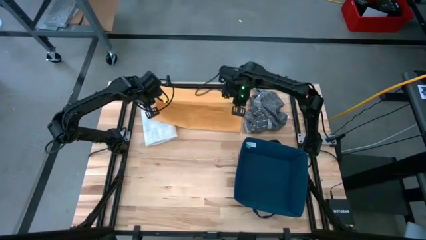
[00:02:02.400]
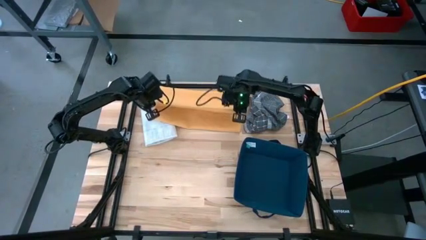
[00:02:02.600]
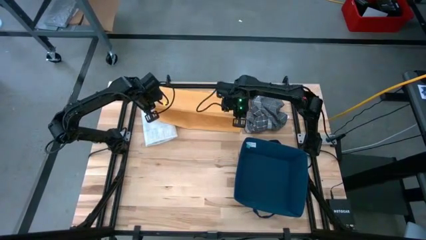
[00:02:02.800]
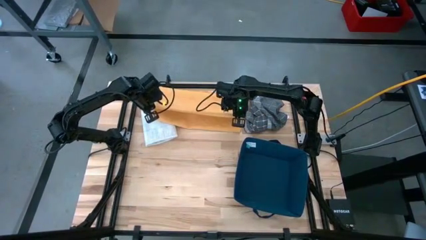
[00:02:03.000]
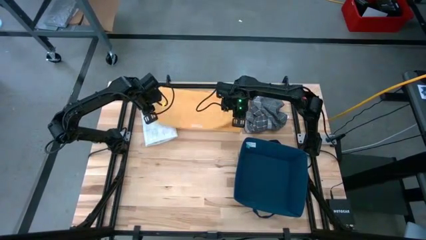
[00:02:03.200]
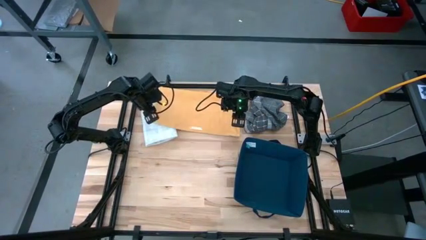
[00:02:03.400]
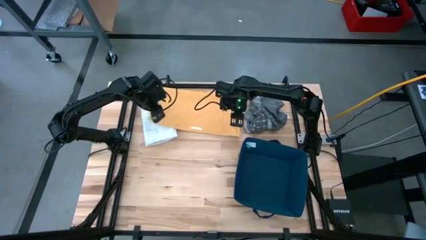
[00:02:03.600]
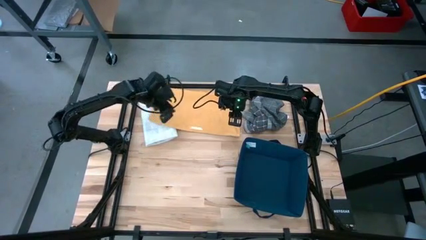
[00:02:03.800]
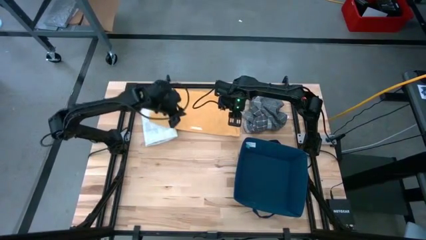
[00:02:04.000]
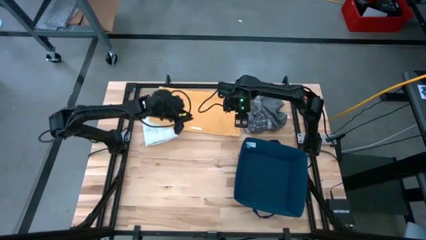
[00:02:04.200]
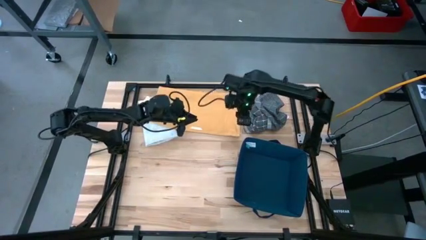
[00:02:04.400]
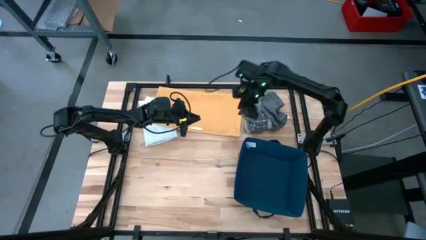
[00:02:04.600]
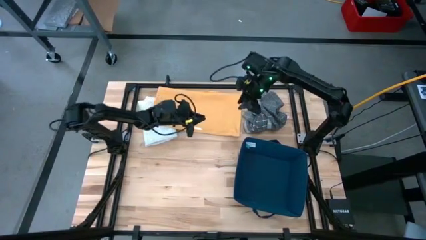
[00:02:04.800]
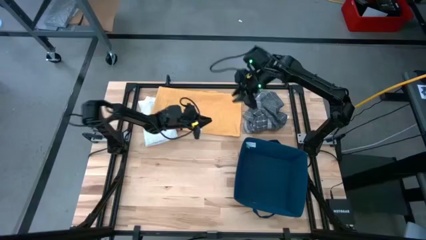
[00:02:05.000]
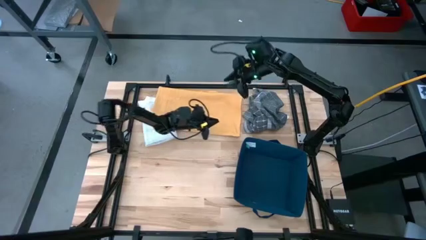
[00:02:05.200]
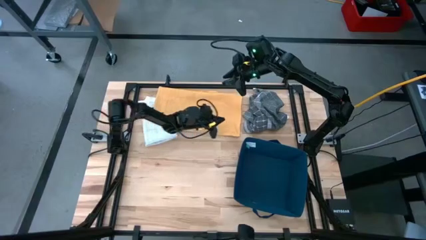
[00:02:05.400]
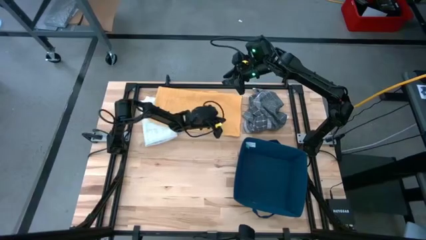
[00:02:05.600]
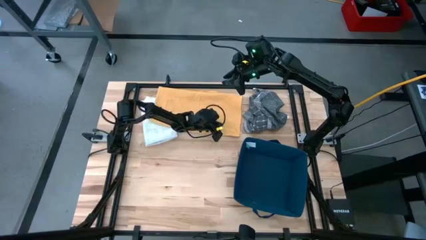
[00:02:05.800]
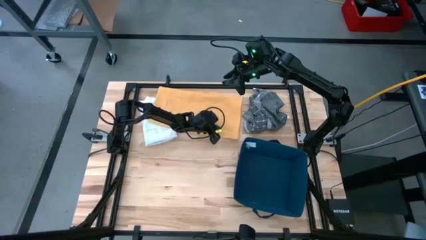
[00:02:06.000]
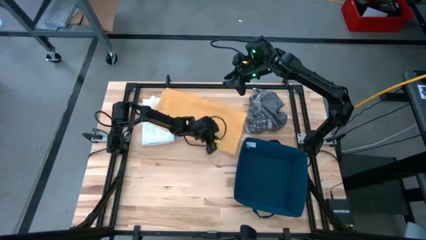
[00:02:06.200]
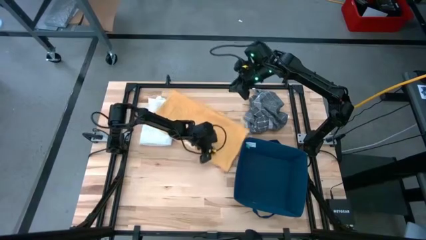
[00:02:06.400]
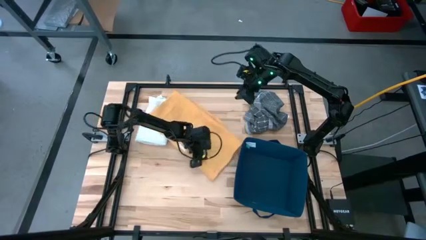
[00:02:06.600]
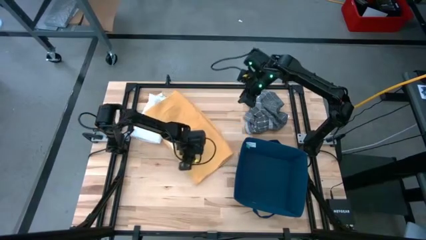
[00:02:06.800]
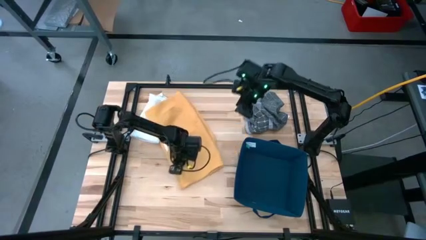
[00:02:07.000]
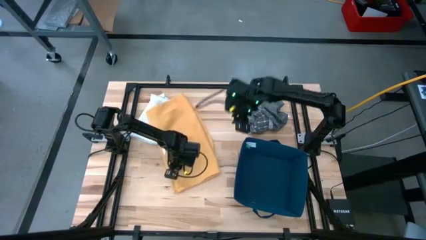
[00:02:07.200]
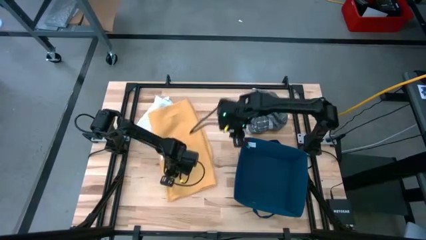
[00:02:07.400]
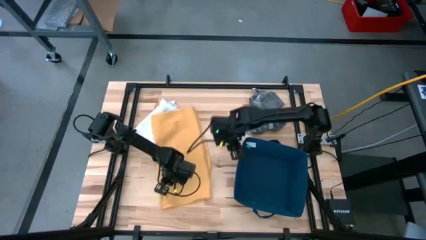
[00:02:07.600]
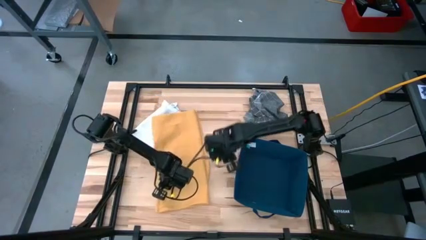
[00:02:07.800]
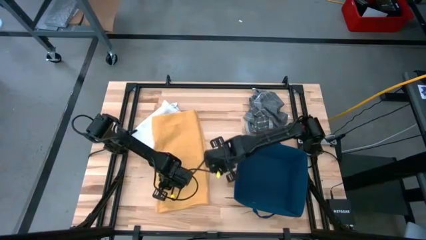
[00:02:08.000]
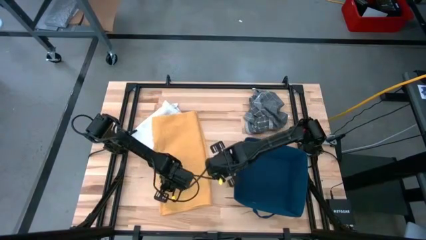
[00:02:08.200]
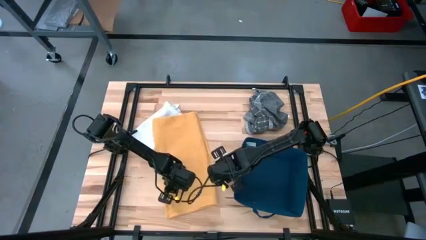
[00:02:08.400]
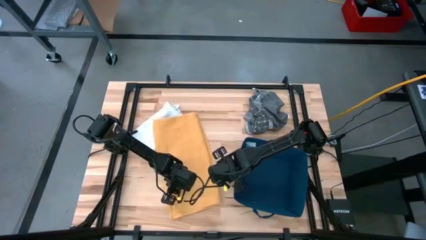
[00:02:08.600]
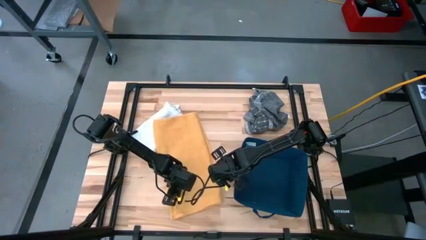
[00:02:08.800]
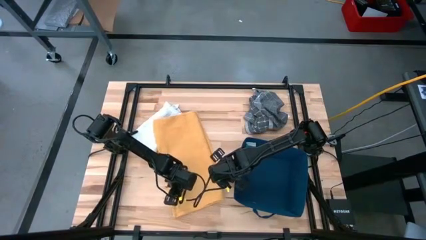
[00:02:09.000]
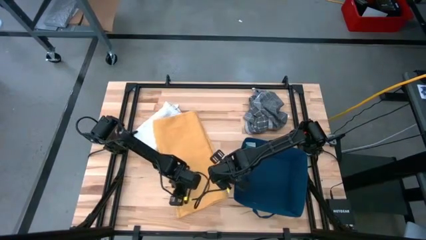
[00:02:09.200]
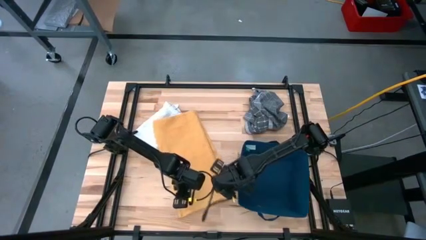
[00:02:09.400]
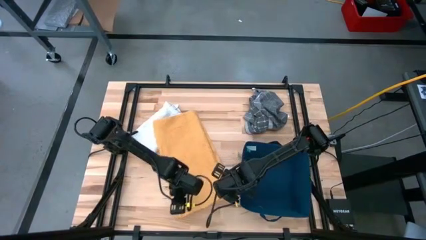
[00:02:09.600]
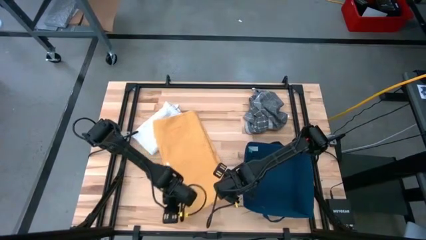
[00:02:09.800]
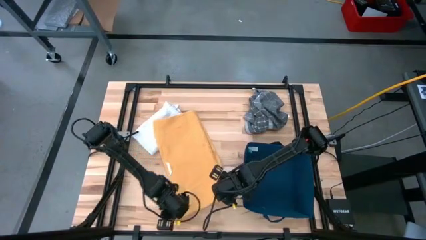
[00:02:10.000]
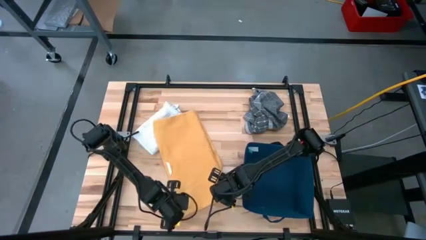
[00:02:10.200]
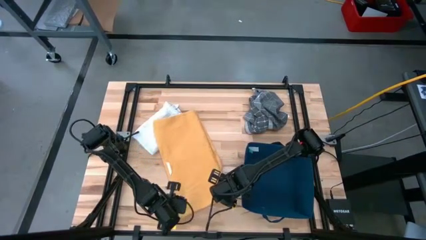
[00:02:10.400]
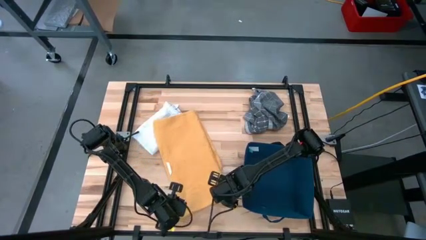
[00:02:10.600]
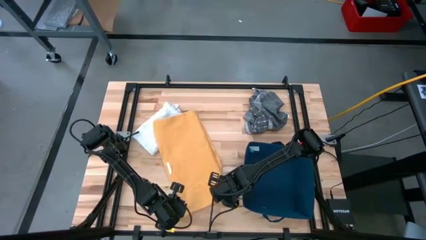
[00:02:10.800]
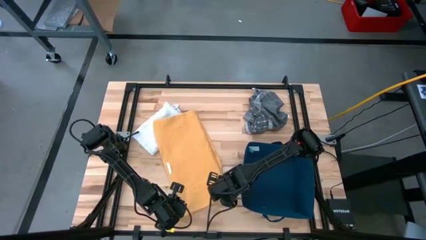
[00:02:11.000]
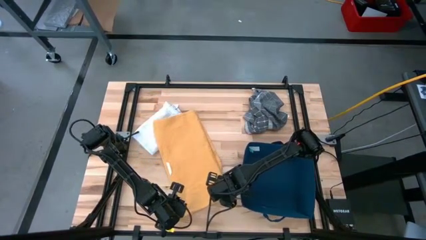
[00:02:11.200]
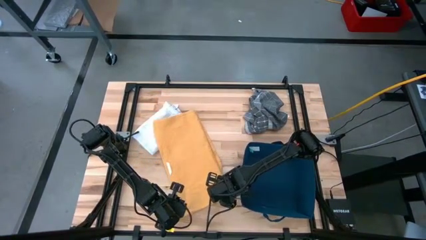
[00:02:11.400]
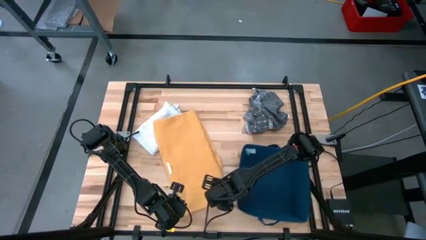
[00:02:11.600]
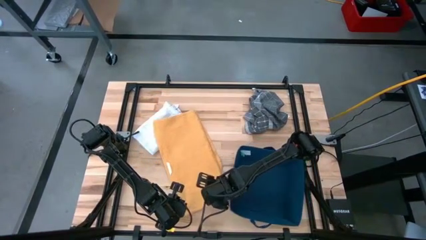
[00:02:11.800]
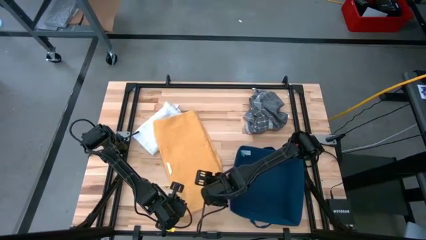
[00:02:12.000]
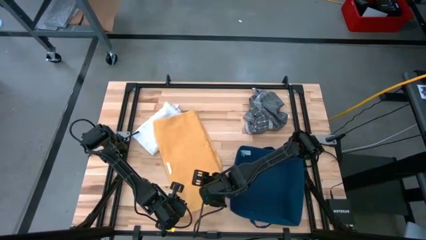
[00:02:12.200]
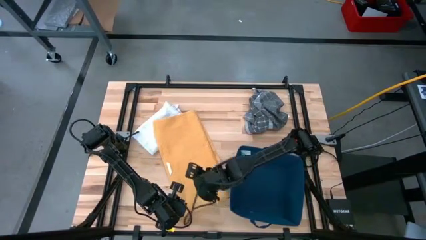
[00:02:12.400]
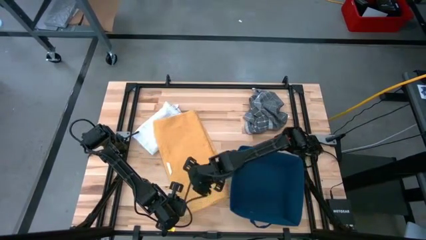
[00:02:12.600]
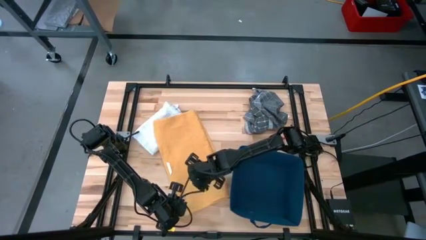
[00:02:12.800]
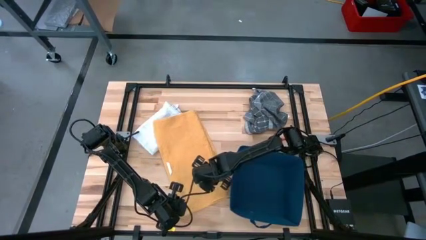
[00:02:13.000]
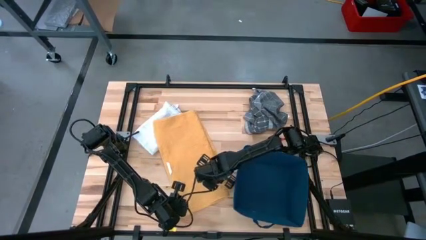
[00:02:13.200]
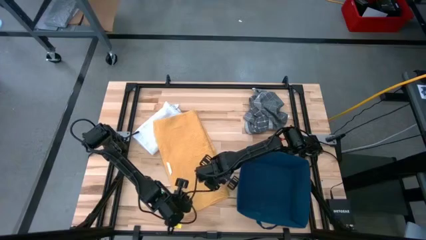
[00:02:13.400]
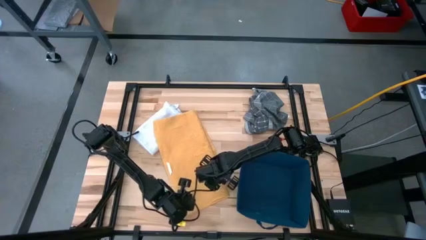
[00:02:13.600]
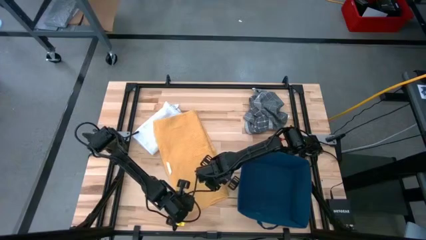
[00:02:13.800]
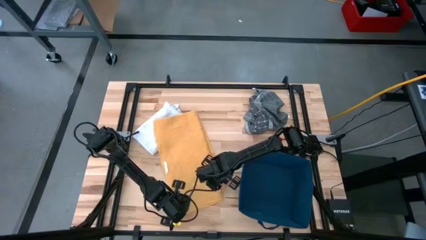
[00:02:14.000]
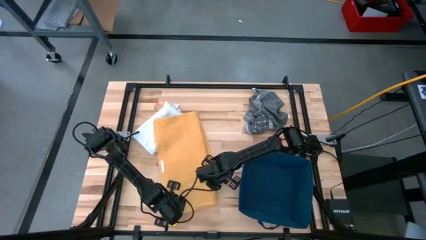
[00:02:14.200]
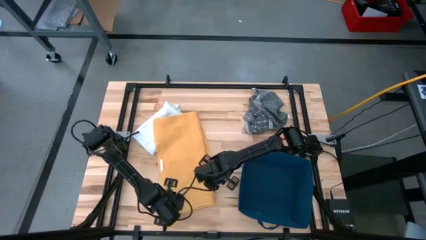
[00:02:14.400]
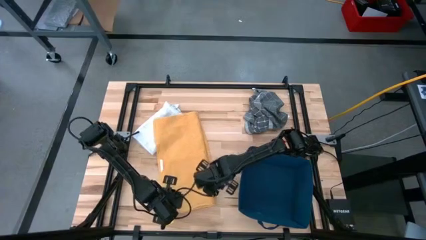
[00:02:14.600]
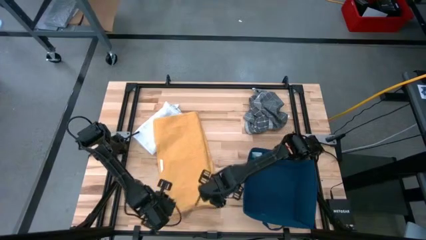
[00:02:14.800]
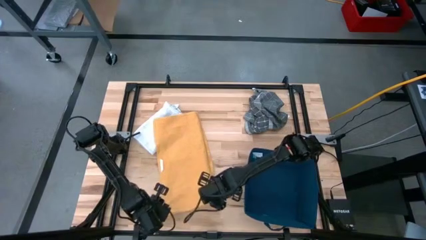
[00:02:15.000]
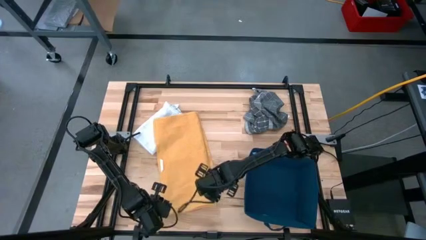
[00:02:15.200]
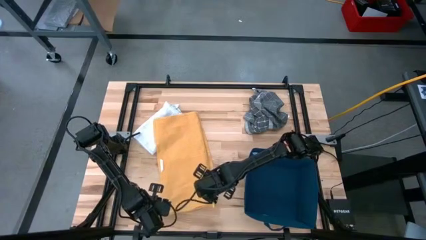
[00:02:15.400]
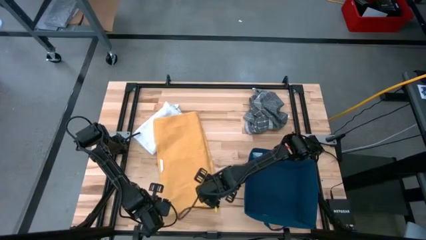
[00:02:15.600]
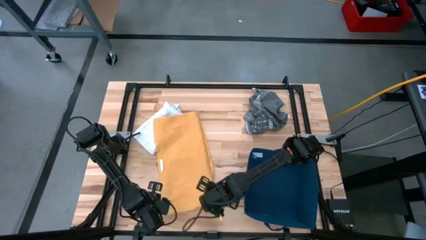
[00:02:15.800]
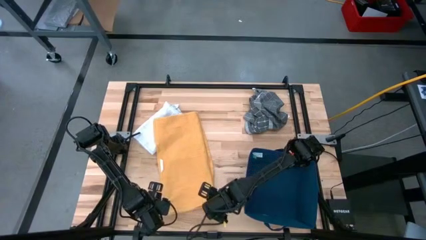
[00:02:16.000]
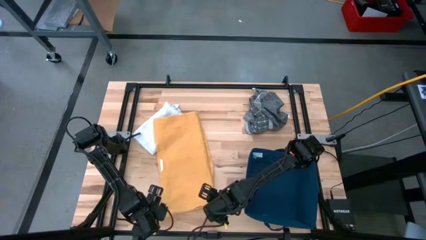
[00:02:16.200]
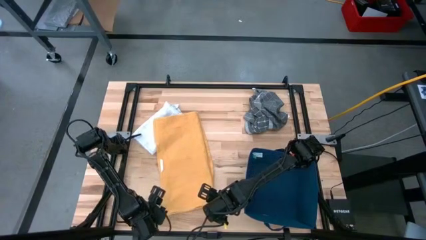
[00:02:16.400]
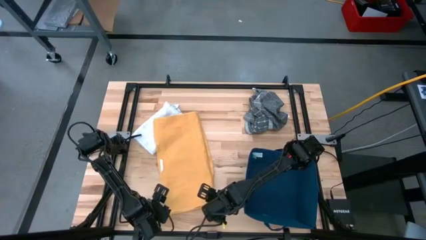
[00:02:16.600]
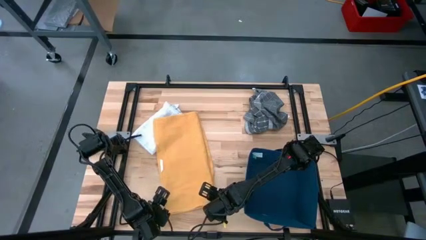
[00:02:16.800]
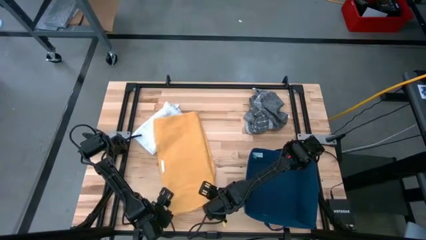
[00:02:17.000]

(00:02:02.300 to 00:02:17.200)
Task: Fold towel
Fold the yellow towel

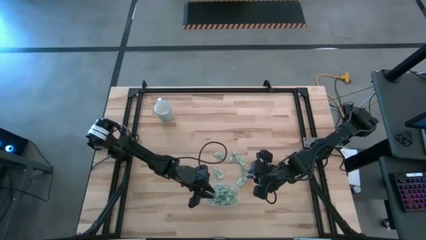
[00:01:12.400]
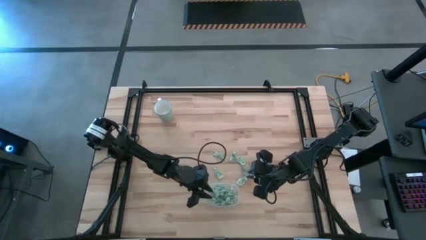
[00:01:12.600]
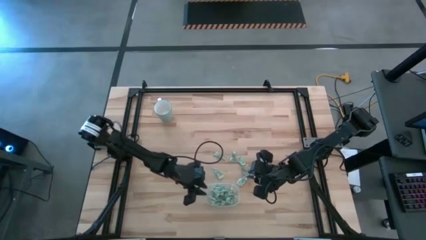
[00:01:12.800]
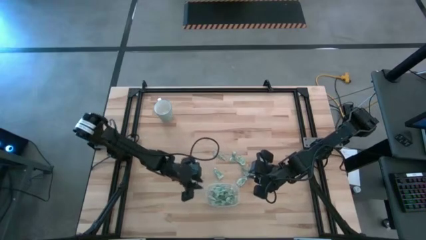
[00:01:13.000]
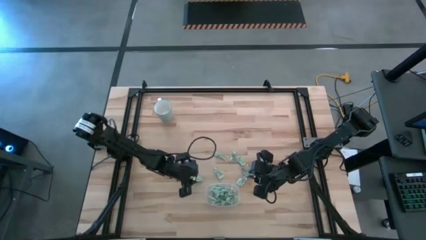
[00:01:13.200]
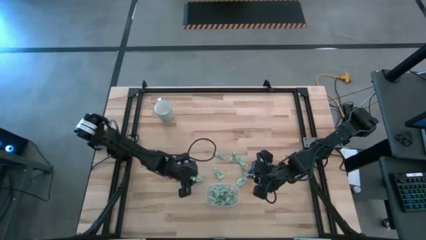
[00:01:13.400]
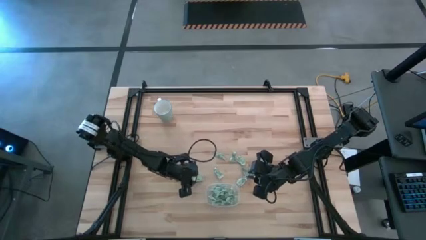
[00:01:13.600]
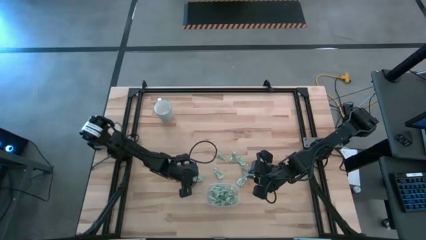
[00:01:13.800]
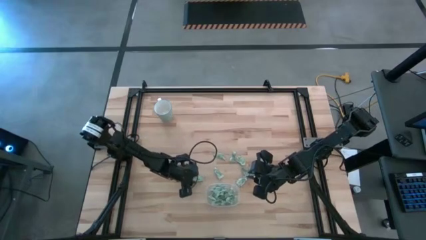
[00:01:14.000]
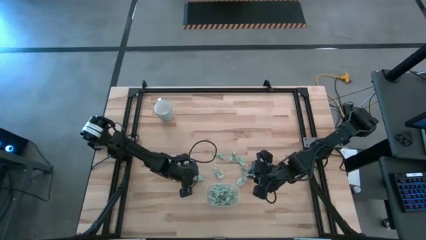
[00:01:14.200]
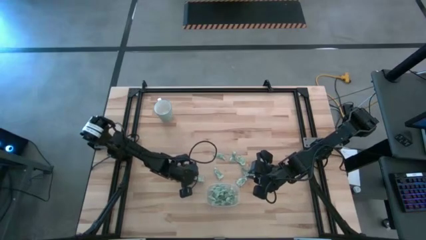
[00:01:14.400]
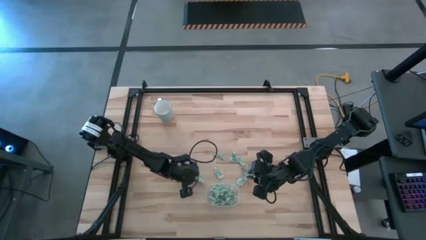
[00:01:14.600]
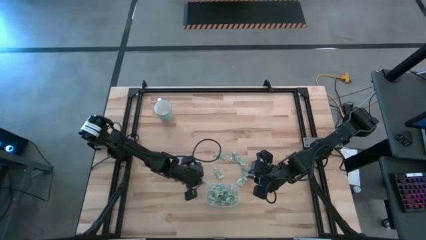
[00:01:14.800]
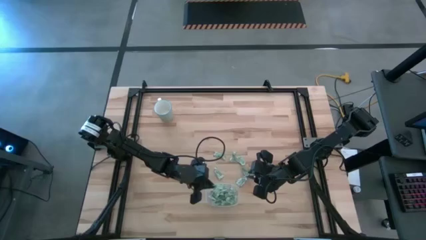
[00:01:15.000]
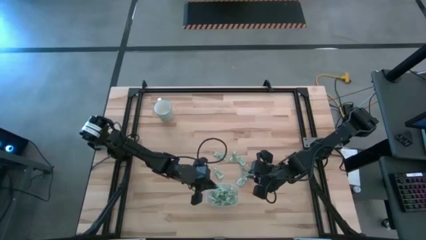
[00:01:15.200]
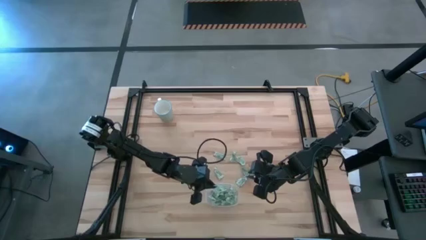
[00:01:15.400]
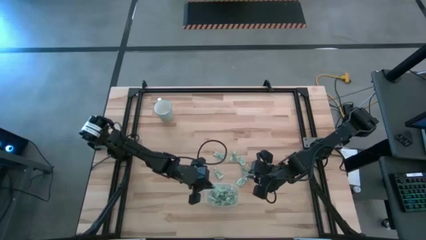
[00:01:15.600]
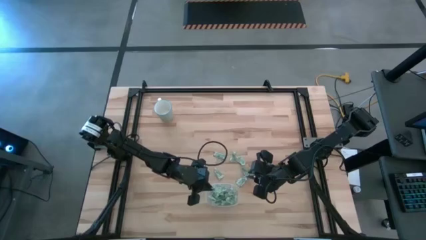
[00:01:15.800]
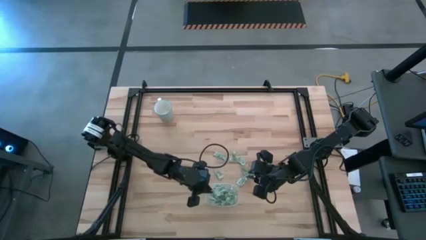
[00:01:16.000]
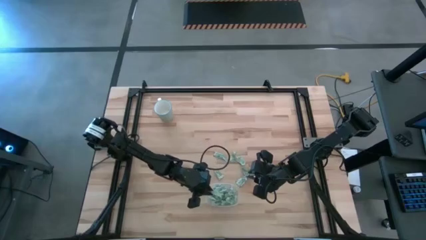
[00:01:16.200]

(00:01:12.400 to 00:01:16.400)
Task: Pick and place Stevia / Truvia into bins
Put the stevia packet into the transparent container
